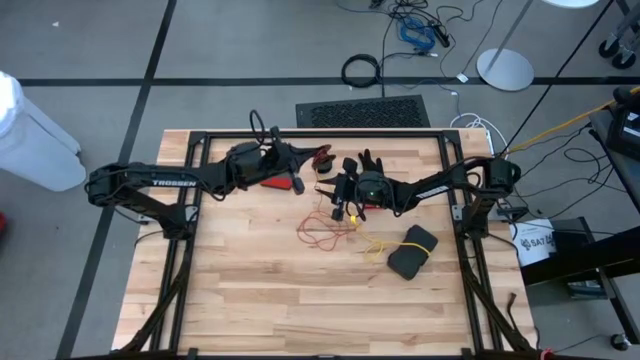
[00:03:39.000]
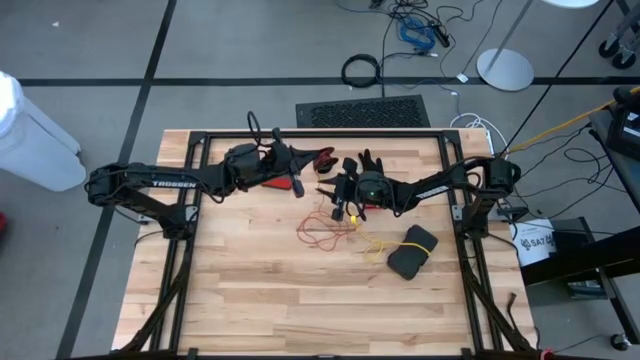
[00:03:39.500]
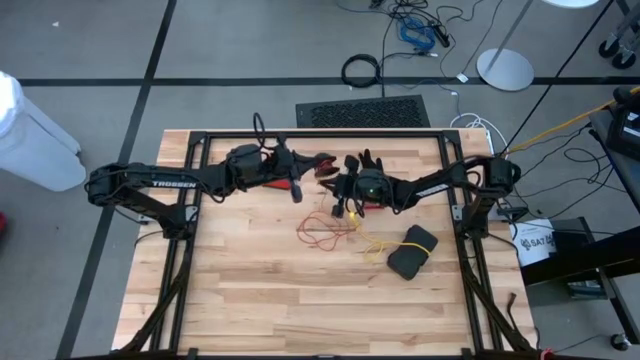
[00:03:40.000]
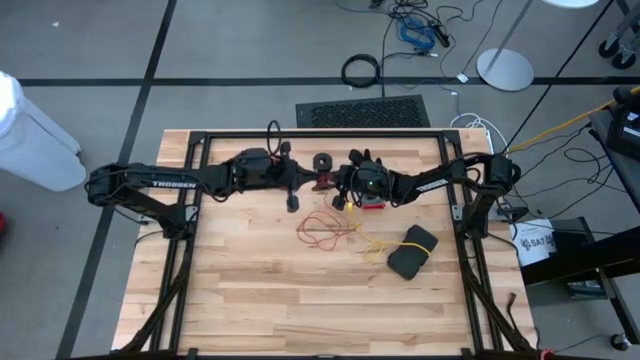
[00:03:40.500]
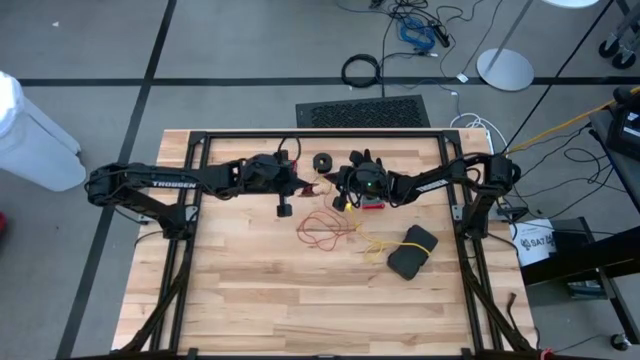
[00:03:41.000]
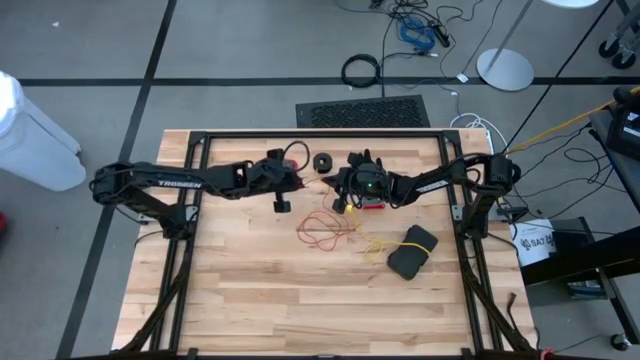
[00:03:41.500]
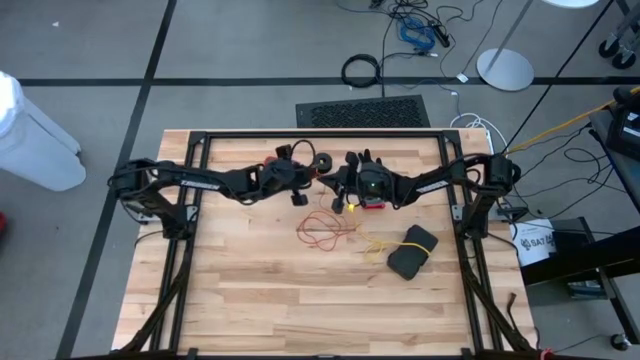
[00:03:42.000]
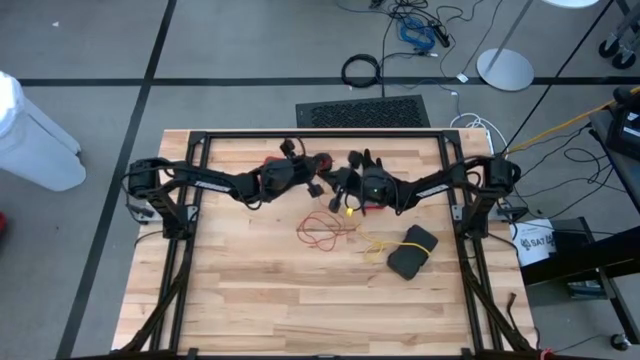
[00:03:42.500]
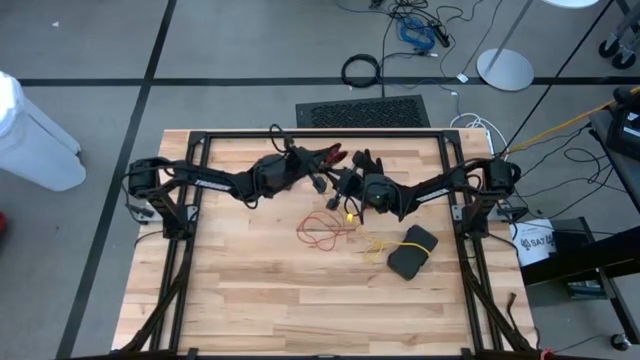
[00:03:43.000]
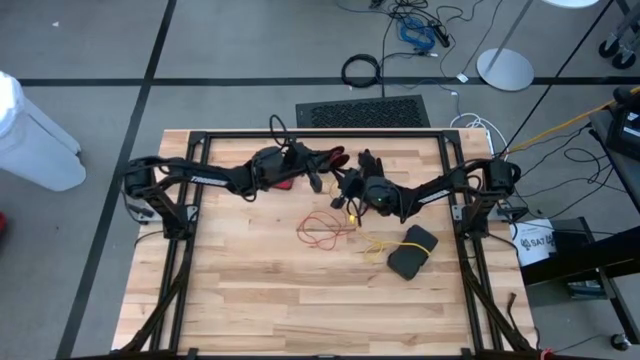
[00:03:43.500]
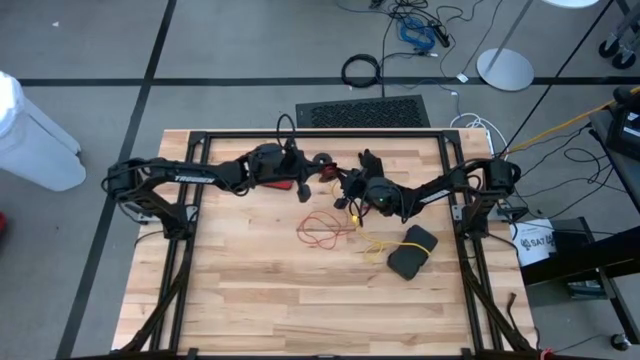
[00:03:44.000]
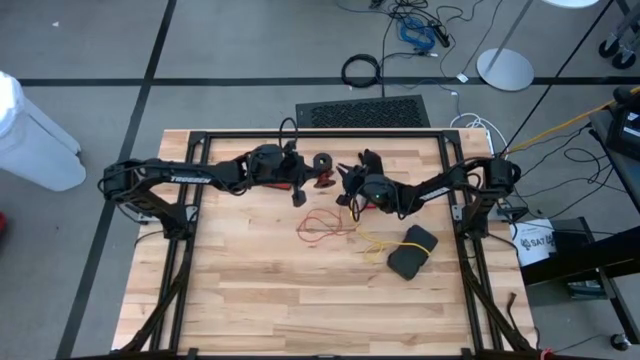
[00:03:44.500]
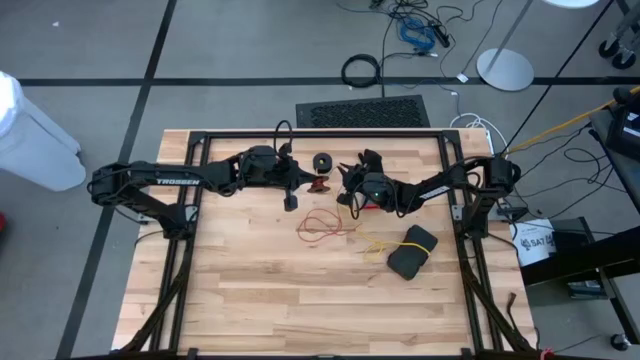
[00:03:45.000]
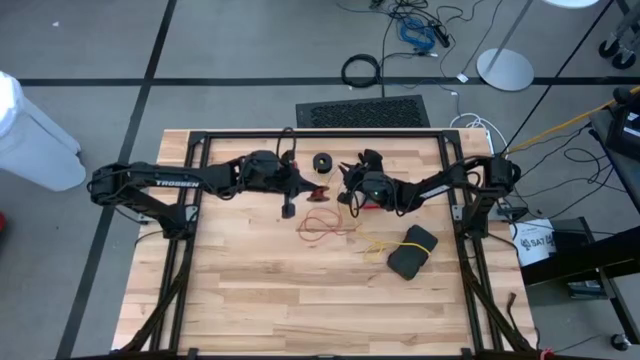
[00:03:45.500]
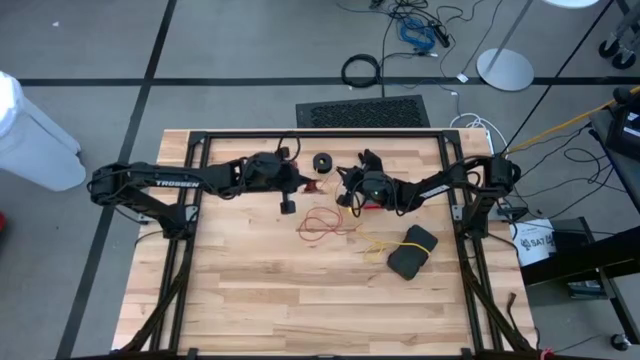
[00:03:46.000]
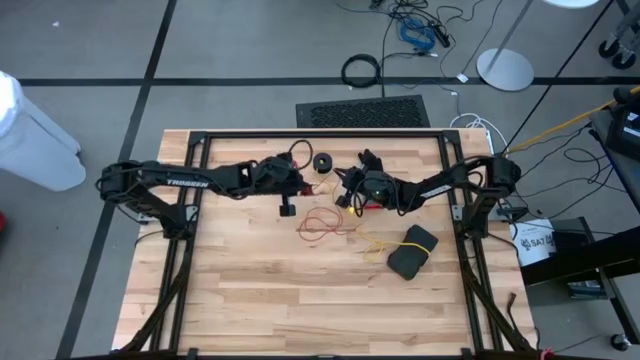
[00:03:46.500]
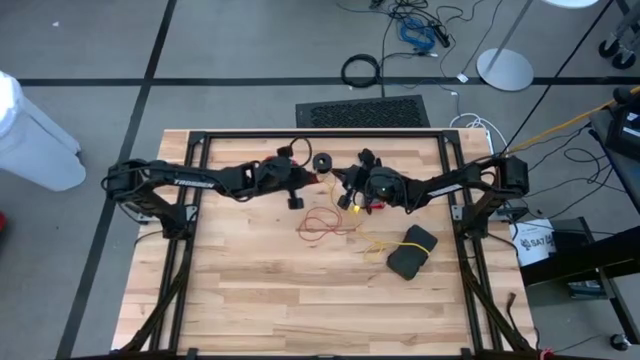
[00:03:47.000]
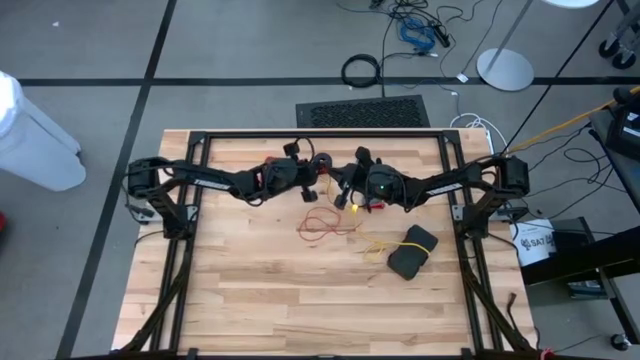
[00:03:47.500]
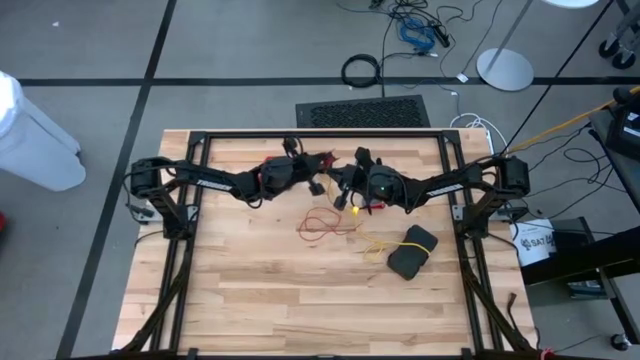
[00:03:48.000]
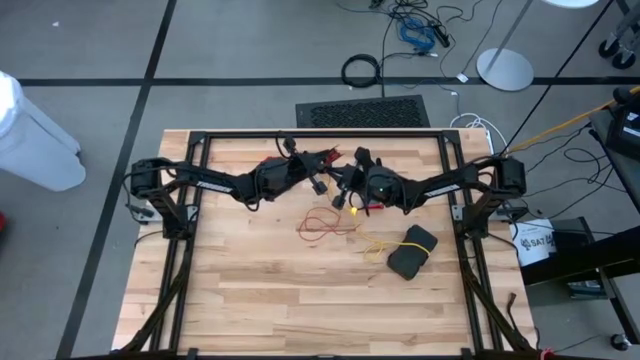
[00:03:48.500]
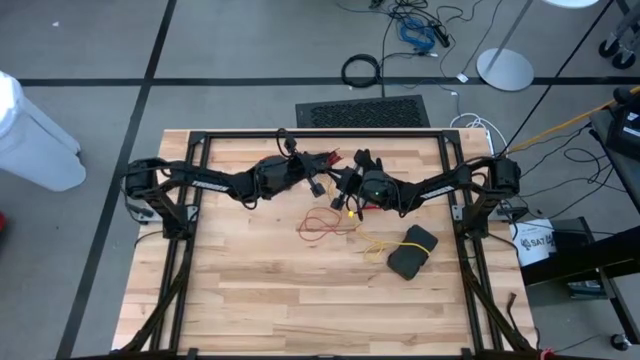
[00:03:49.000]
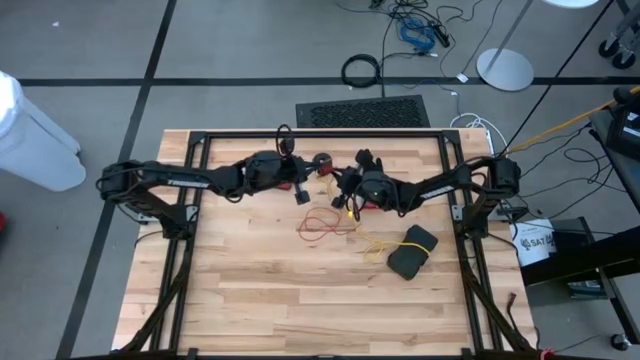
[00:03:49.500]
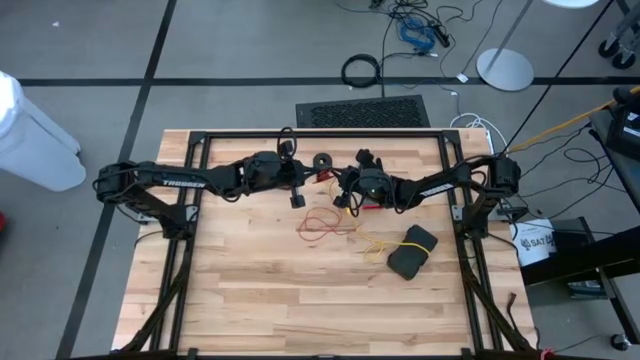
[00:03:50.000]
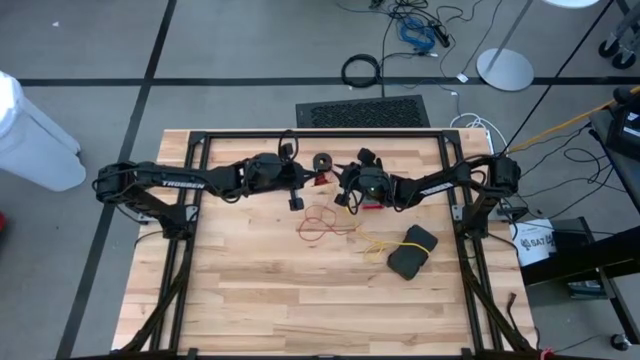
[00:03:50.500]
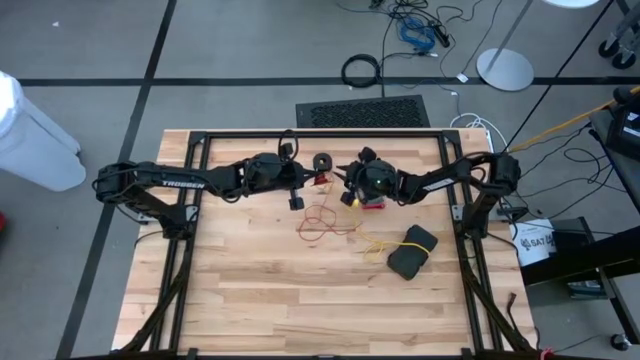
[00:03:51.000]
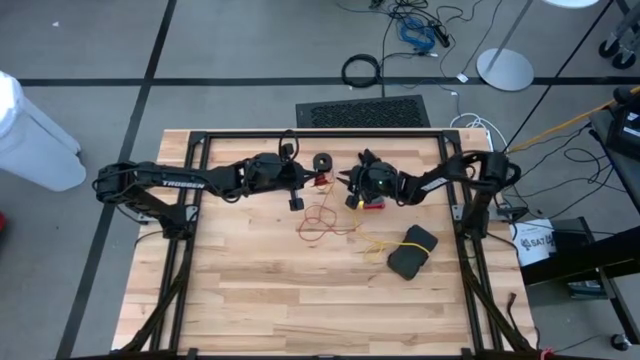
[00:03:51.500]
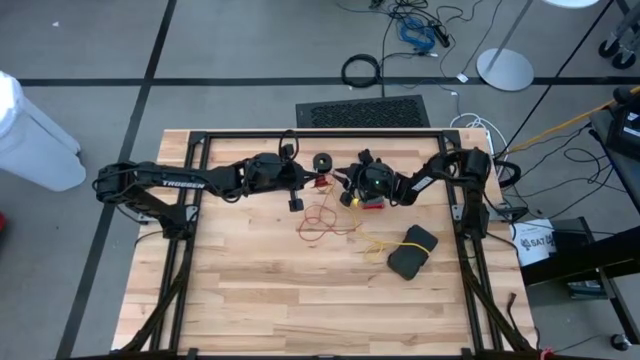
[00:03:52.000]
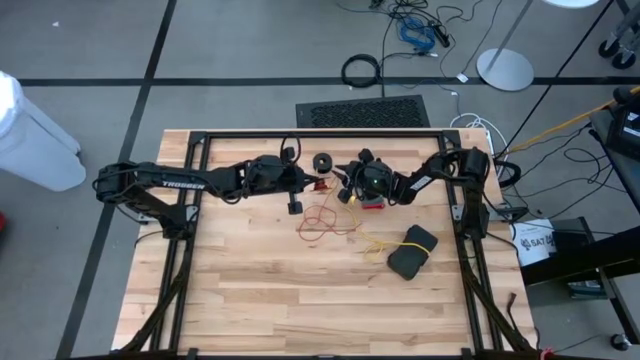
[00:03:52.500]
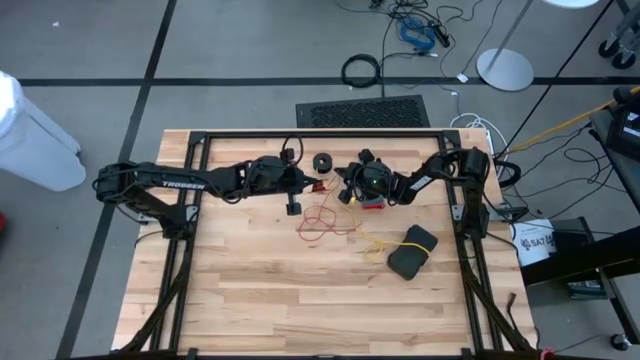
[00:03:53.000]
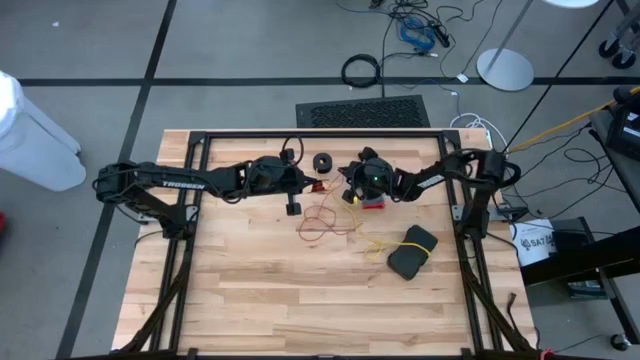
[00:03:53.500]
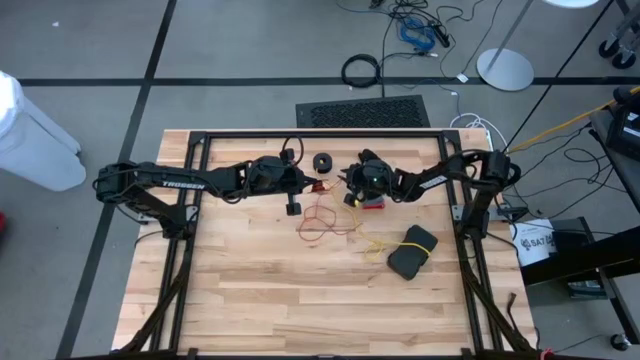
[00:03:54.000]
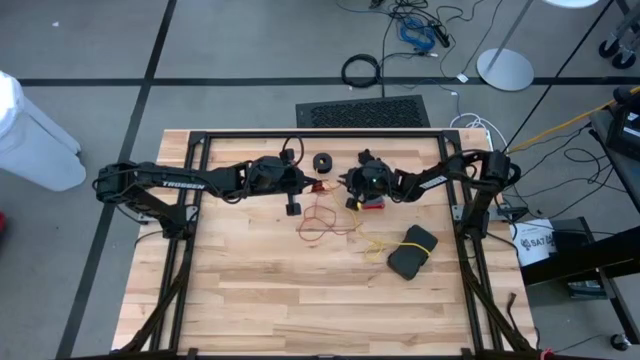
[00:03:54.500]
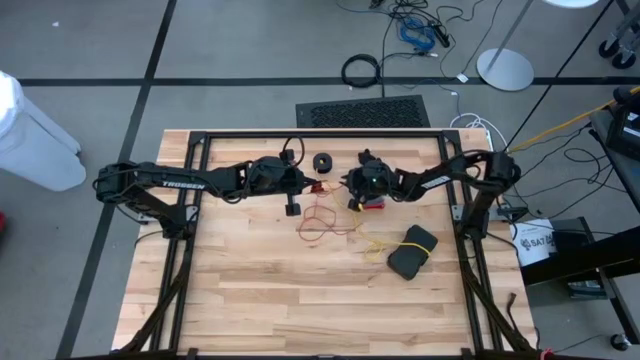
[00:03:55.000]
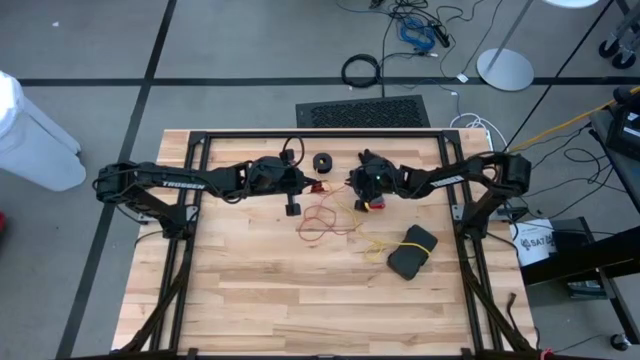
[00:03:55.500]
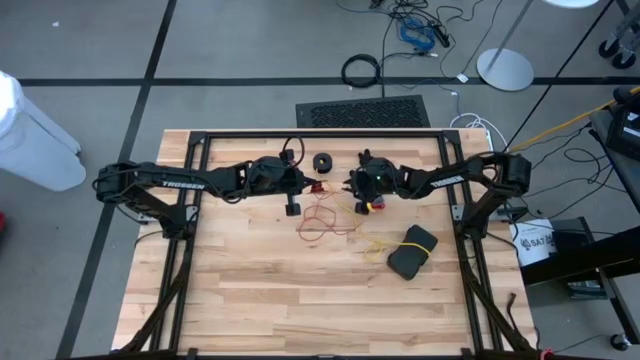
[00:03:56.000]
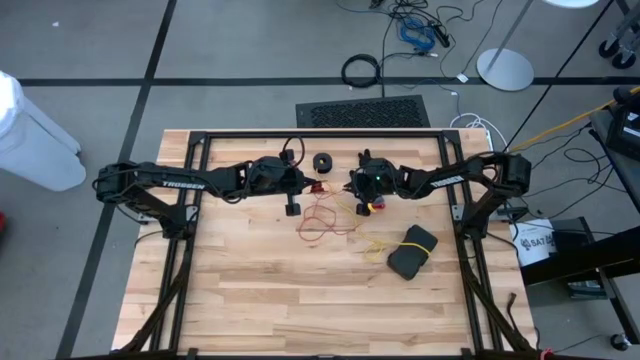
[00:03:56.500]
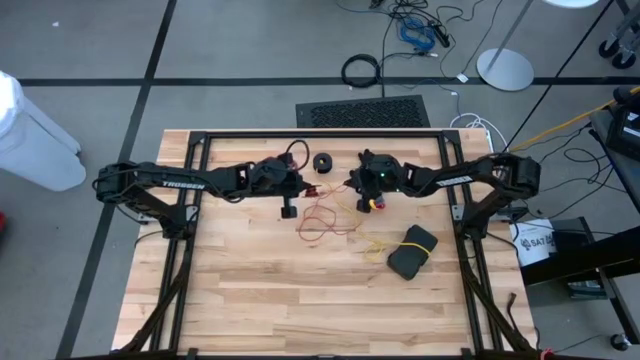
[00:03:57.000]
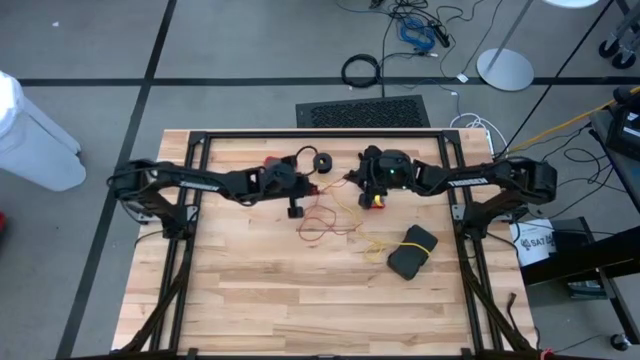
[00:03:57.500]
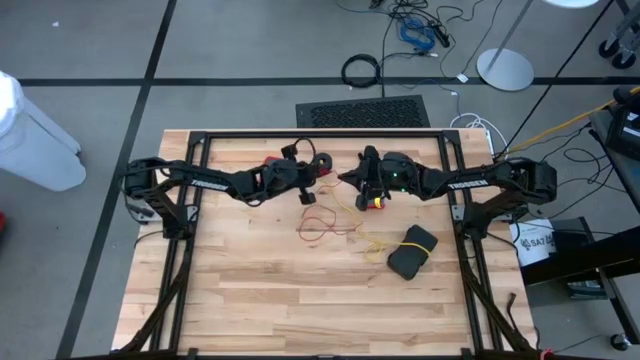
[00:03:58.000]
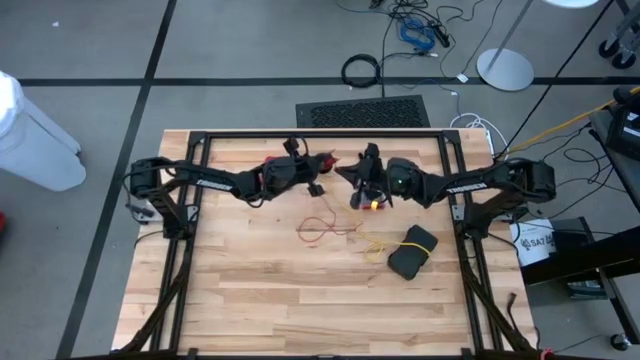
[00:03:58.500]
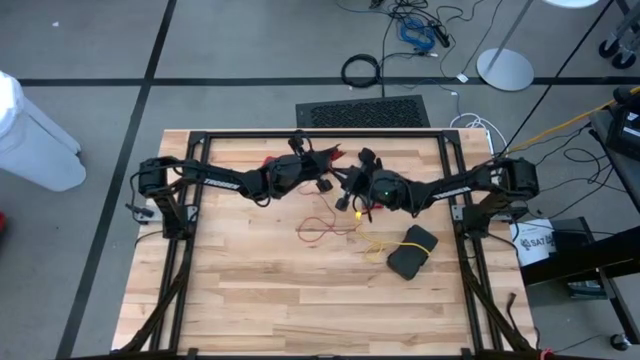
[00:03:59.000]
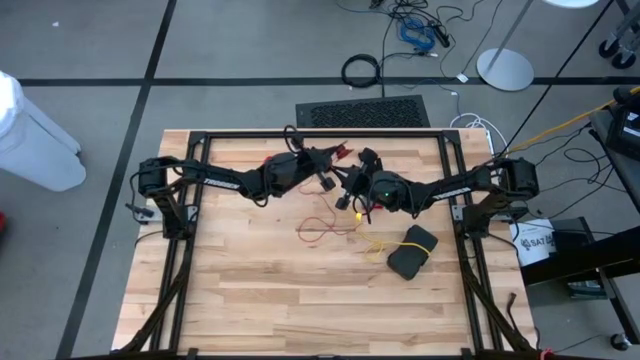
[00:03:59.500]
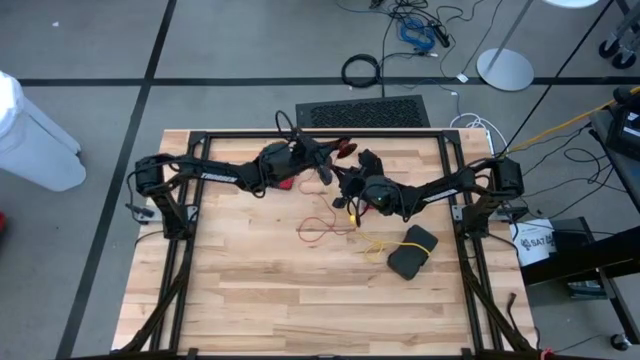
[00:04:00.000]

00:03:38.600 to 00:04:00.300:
Task: Coil cords
Coil the red wire onto spool
